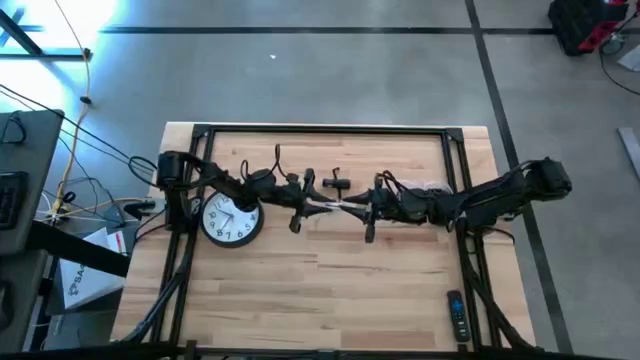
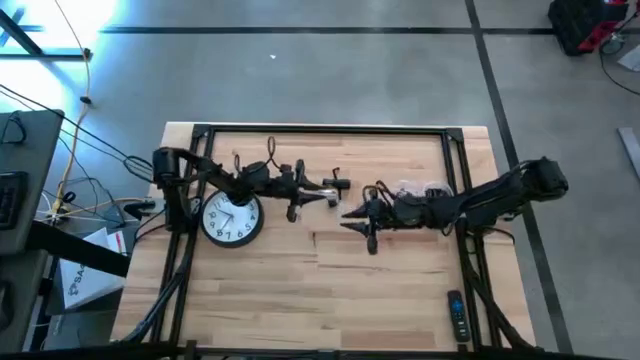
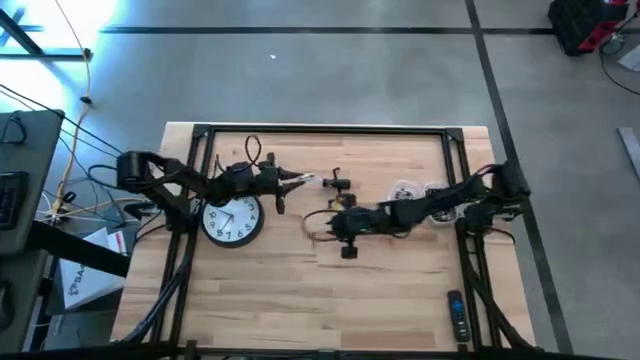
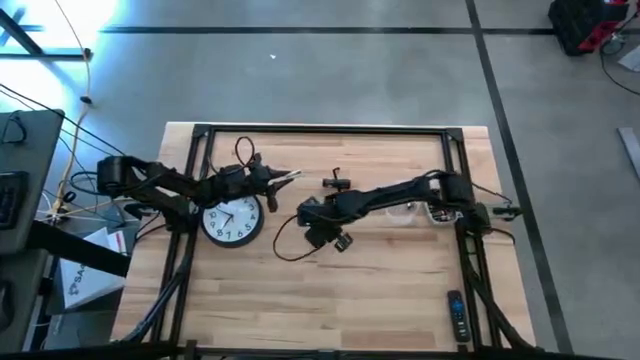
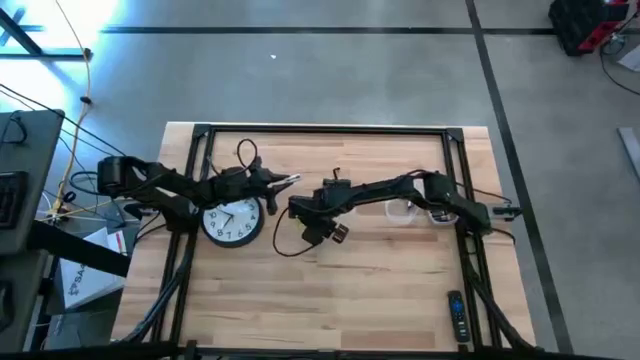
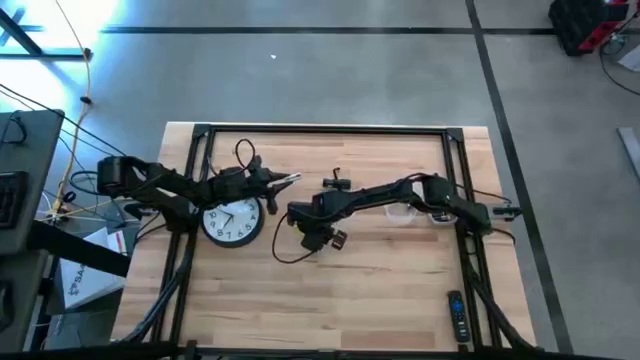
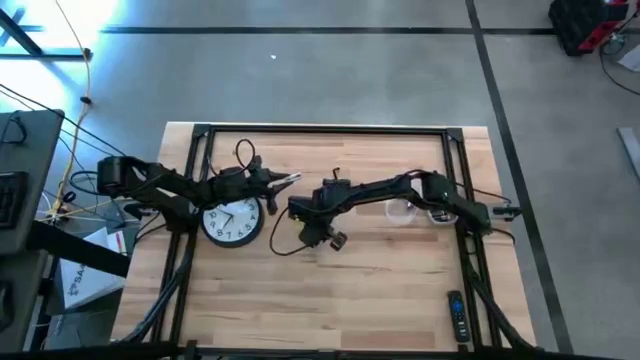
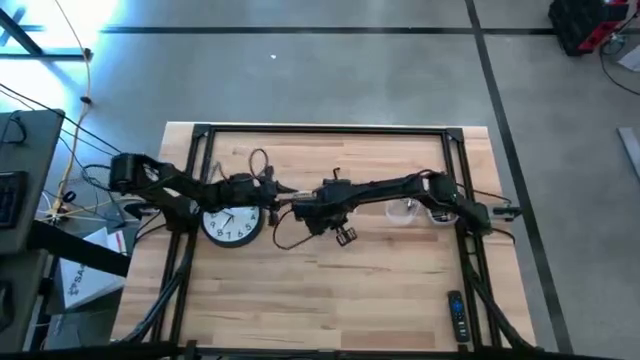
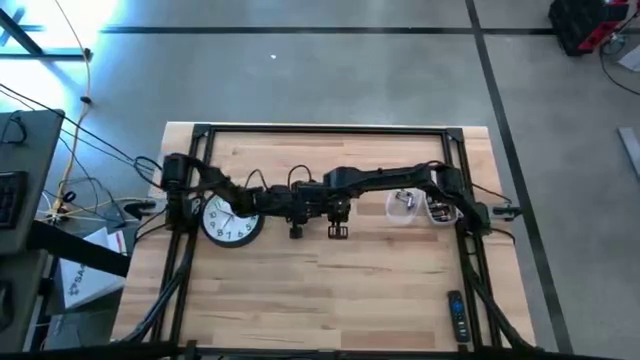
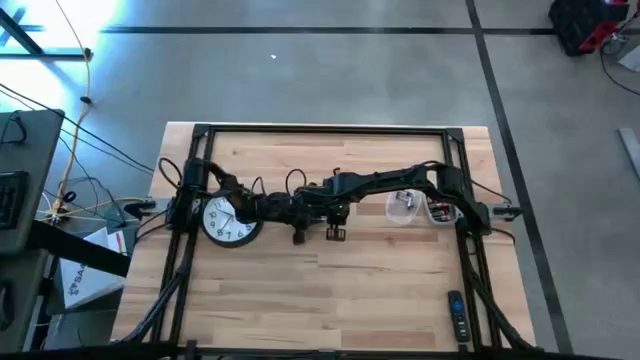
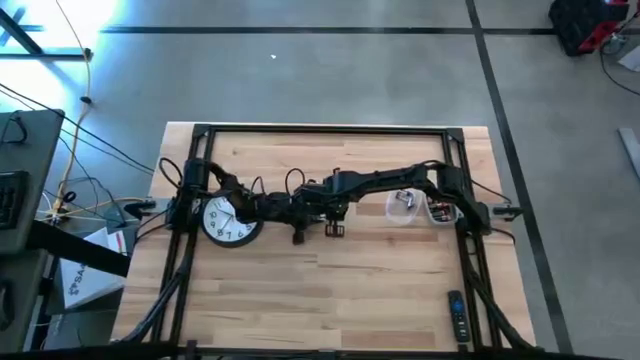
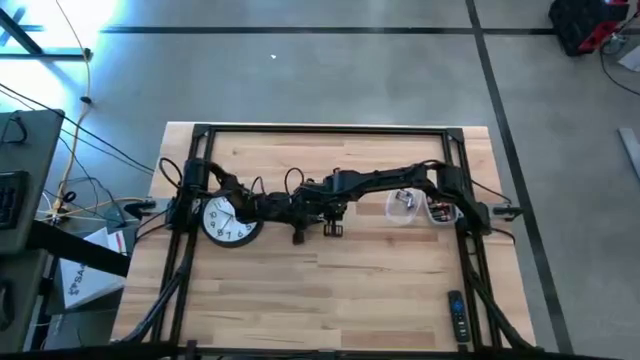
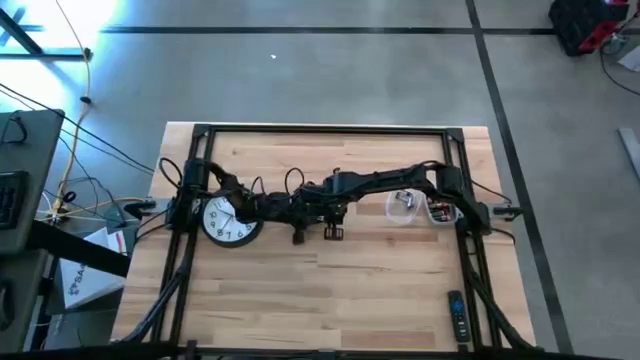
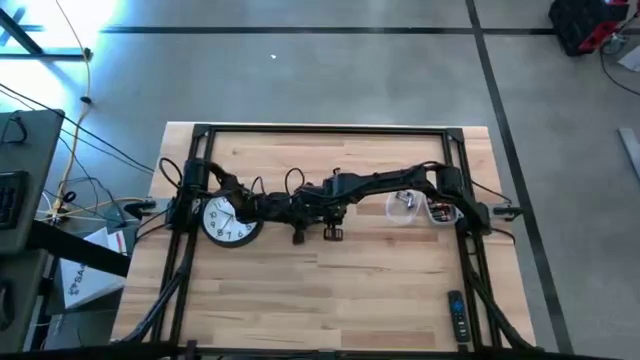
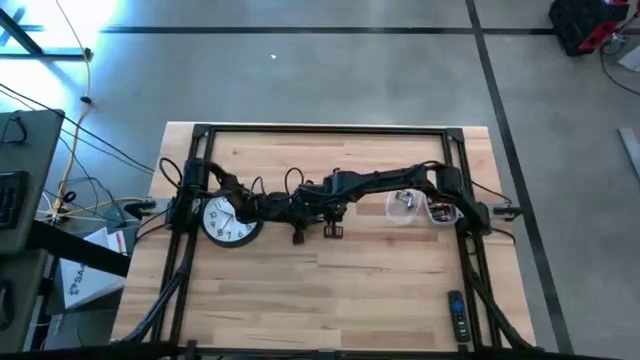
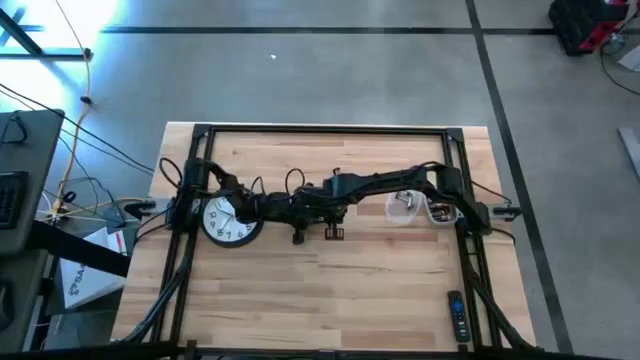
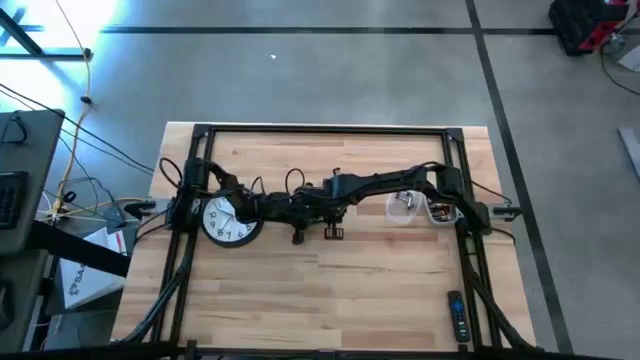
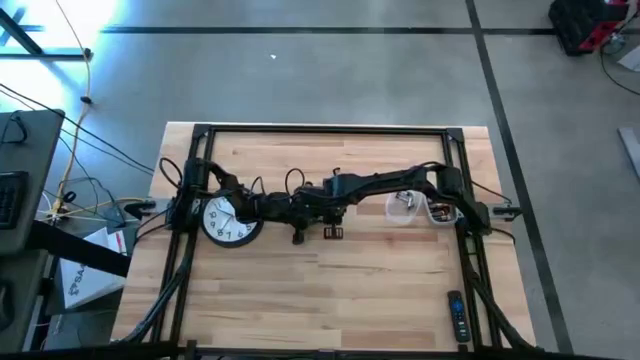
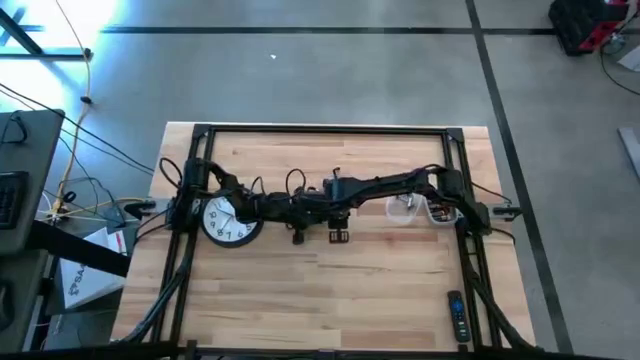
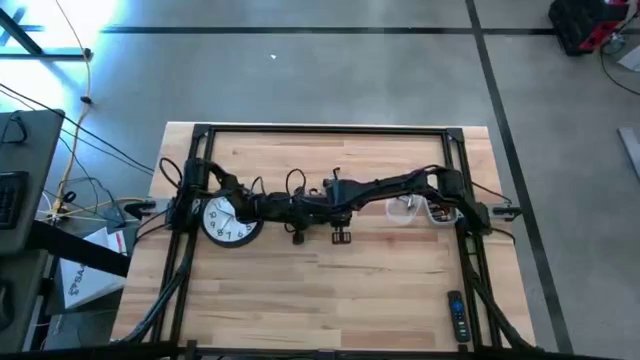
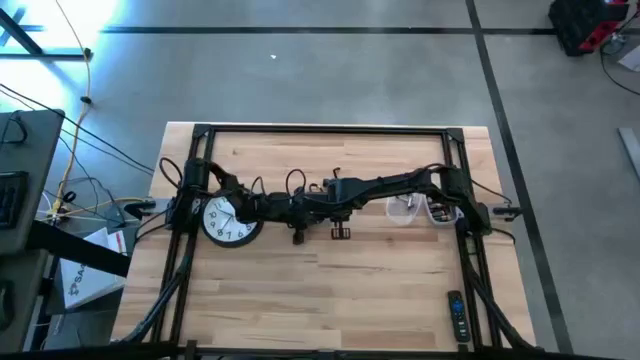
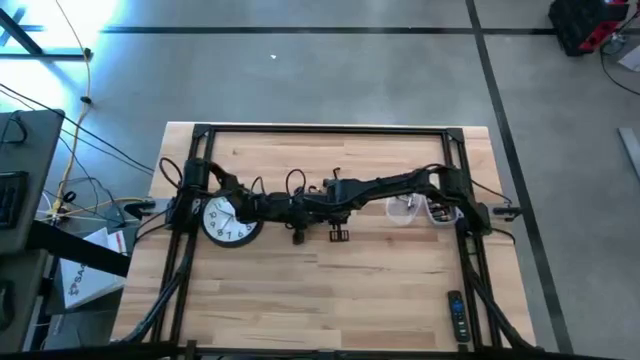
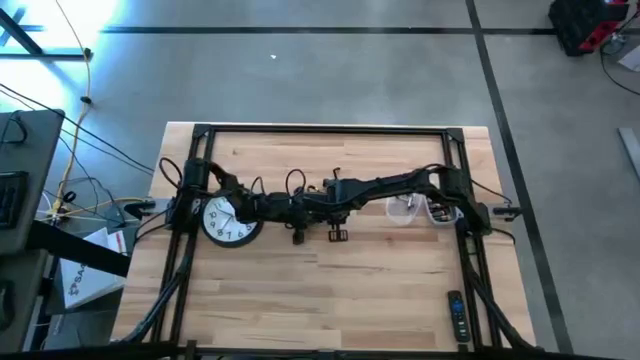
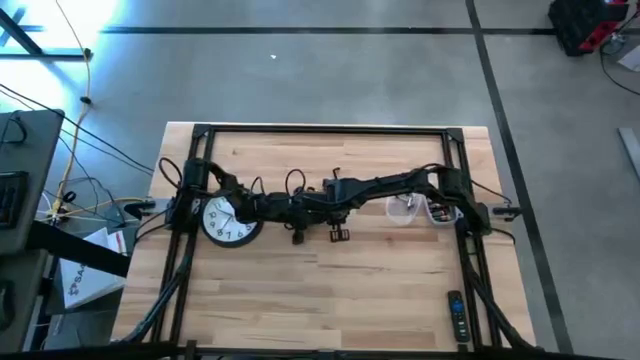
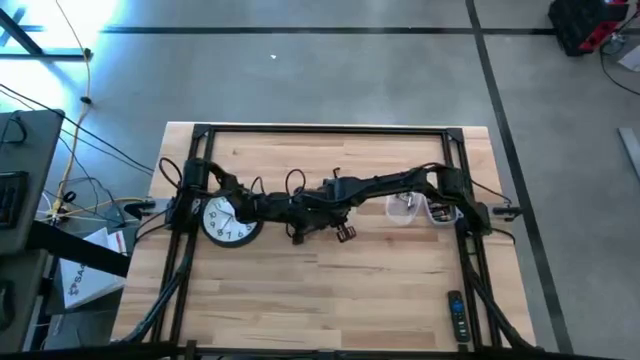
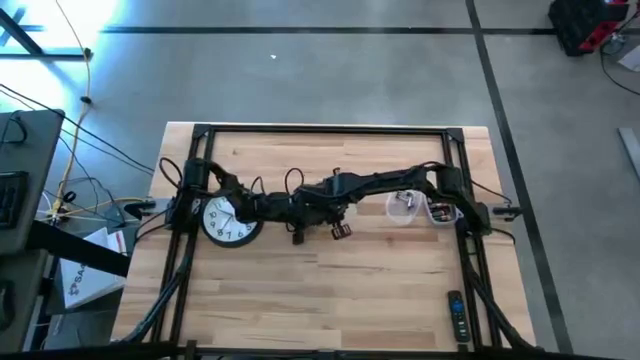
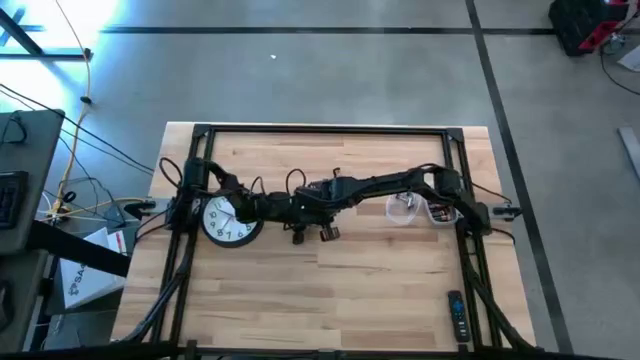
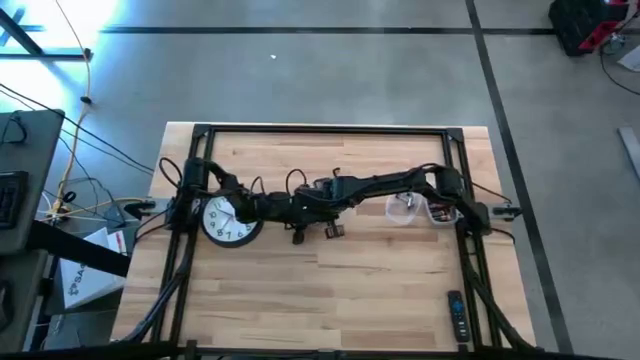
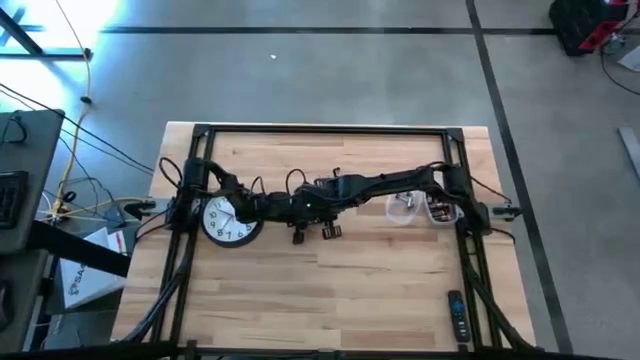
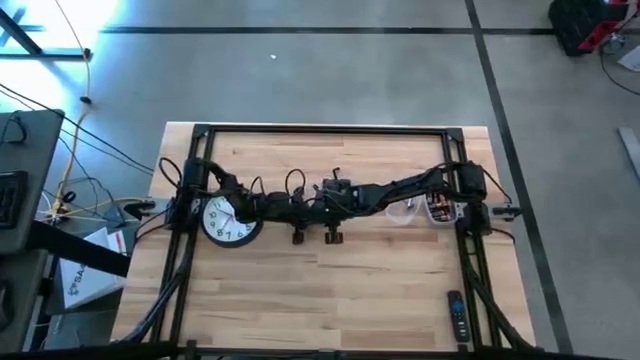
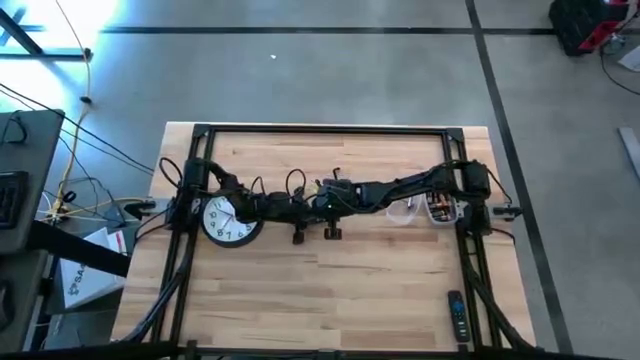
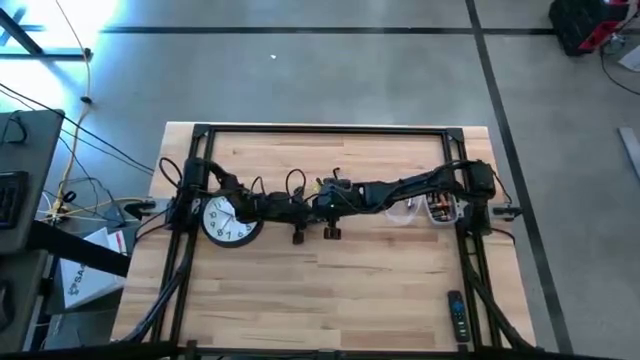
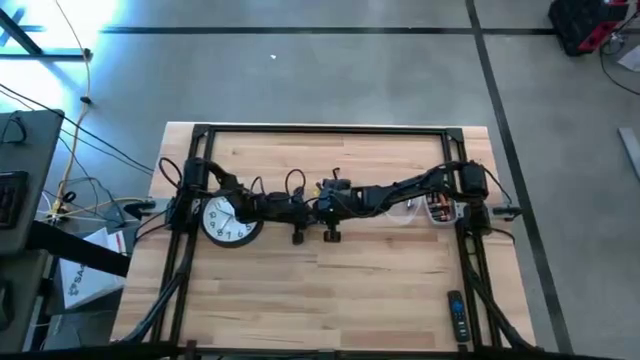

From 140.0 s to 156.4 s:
Task: Insert battery
Insert the silver battery into the white battery case

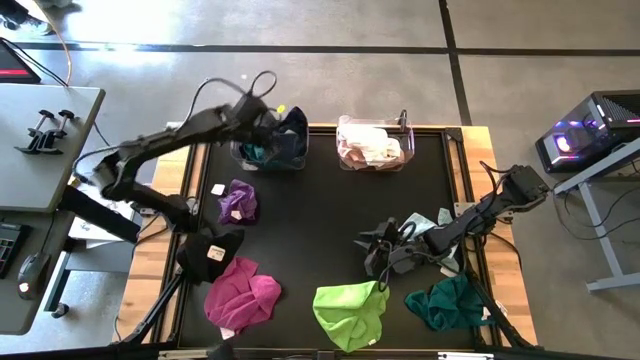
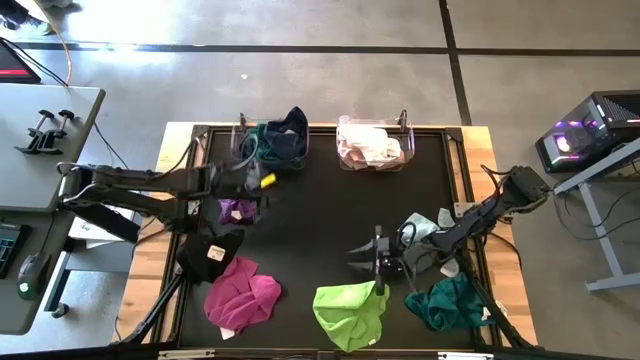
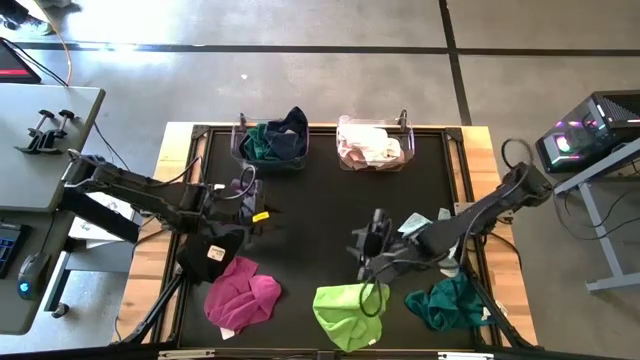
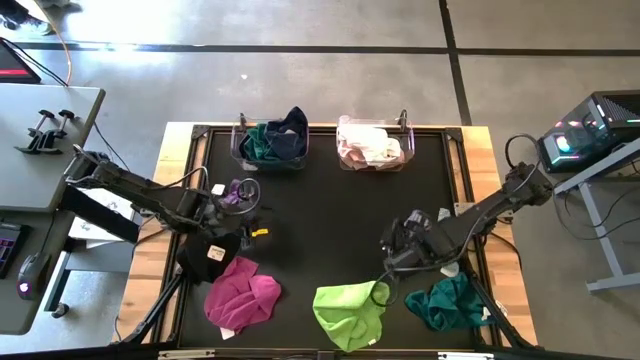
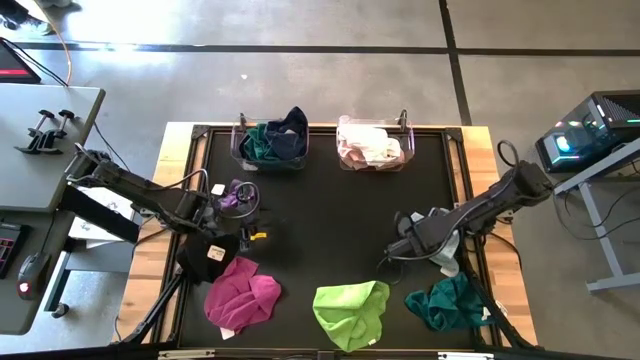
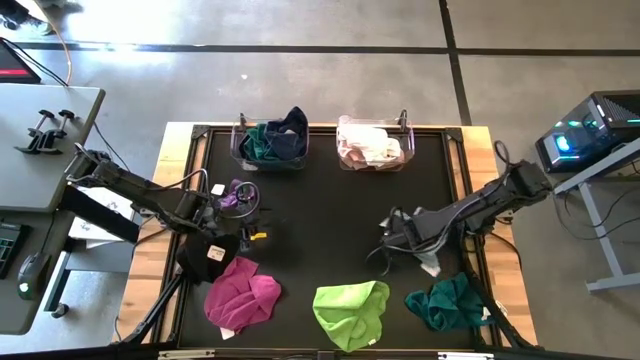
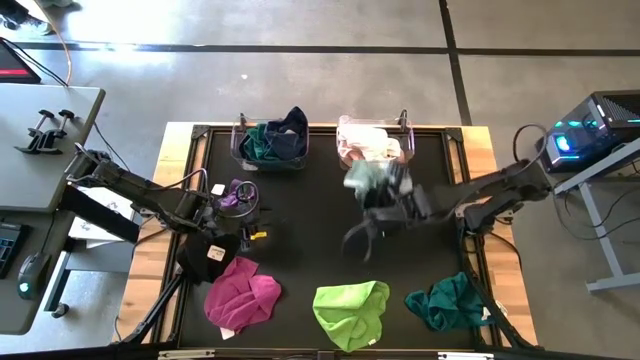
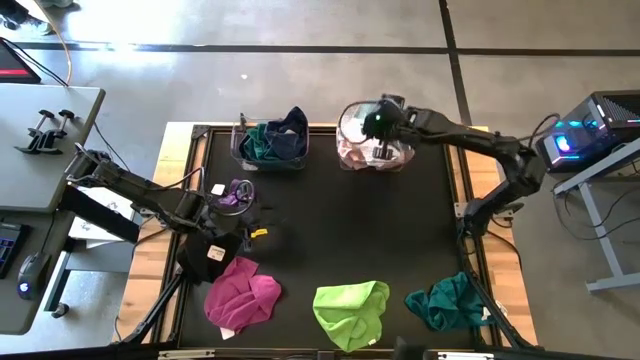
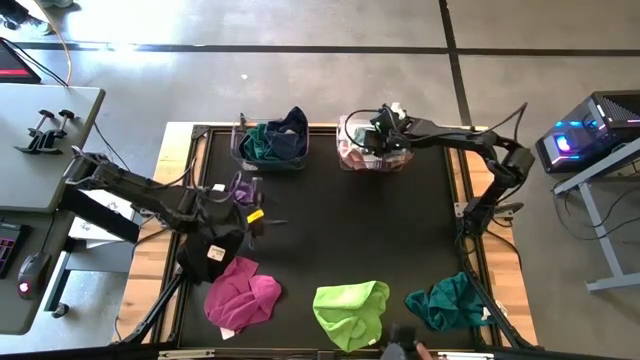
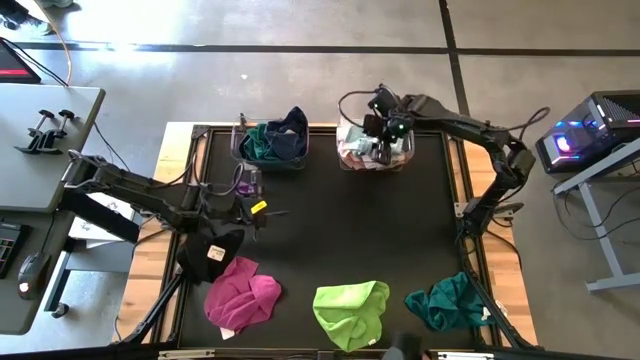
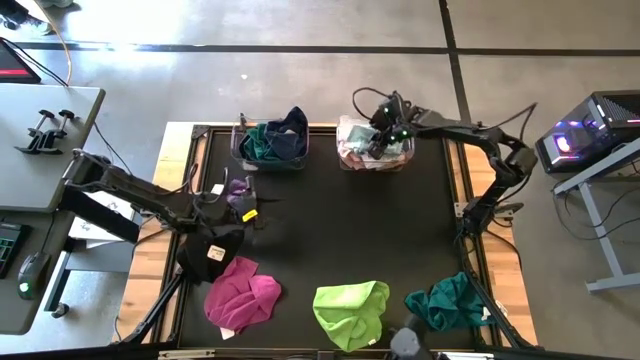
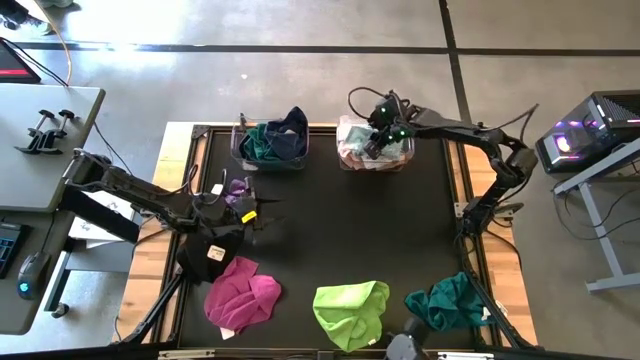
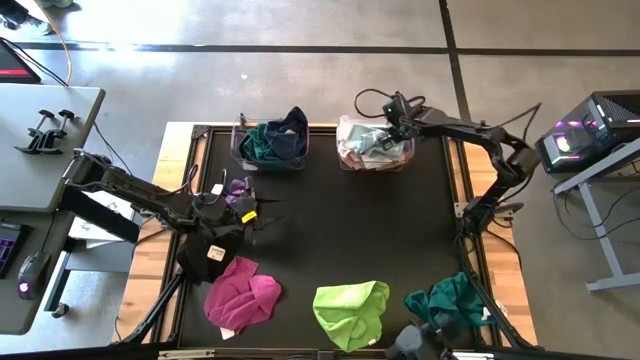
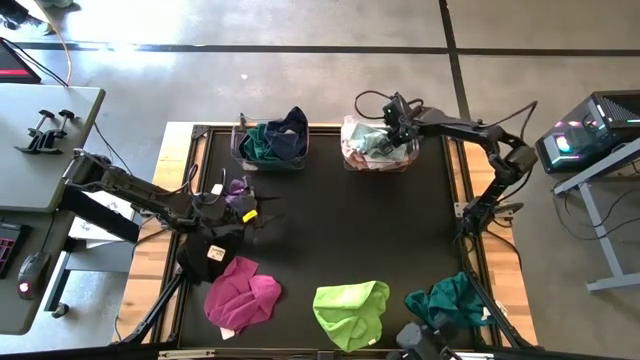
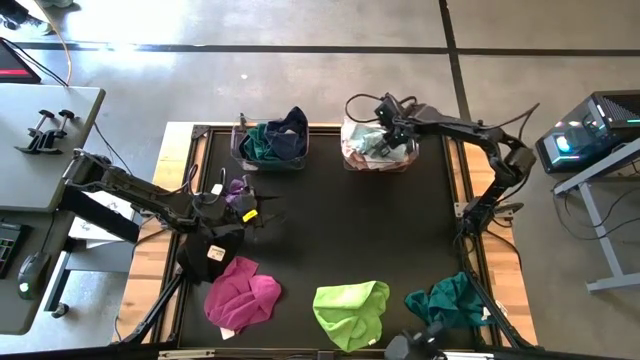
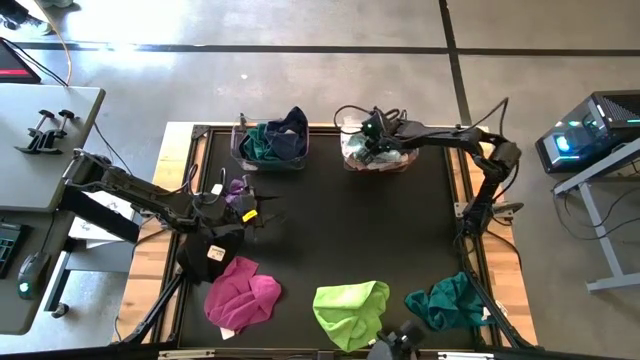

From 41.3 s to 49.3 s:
Task: Sort towels by color in basket
Put the light blue microfiber towel into the right transparent bin
